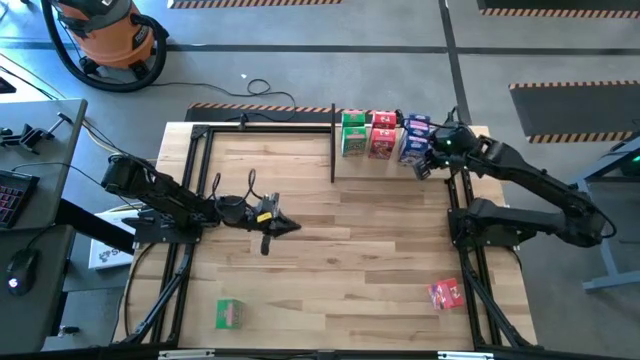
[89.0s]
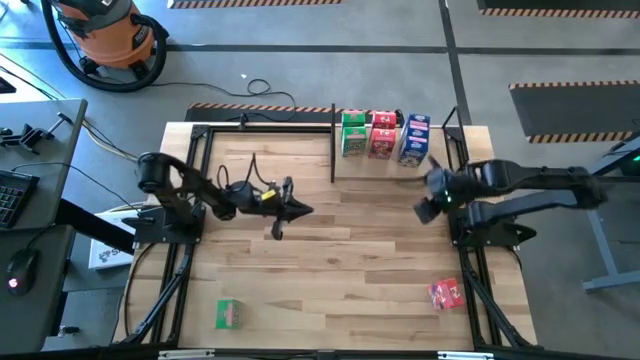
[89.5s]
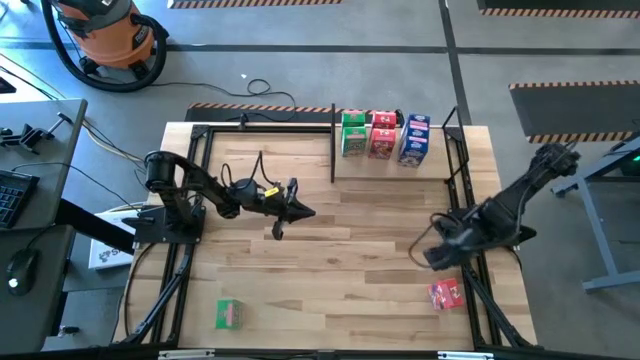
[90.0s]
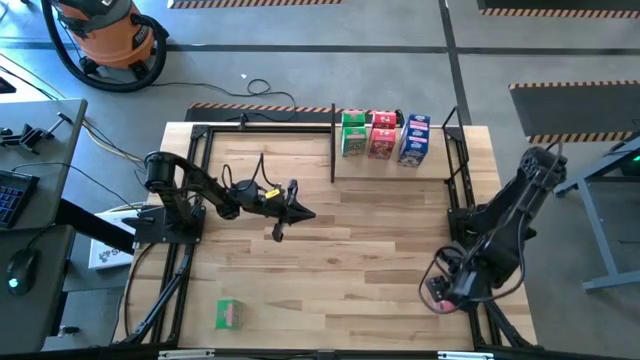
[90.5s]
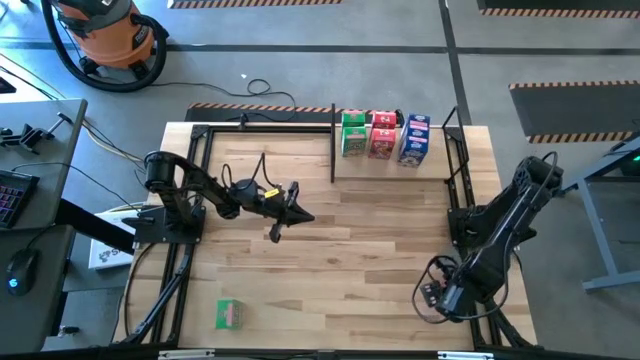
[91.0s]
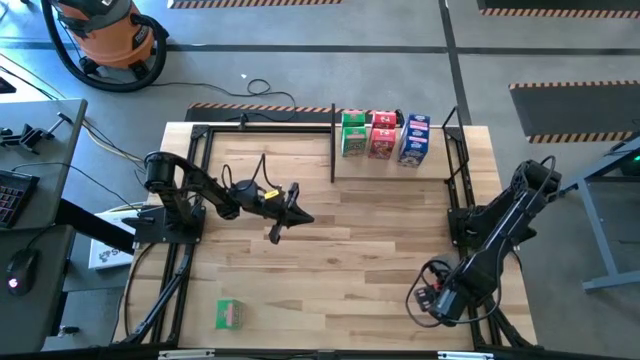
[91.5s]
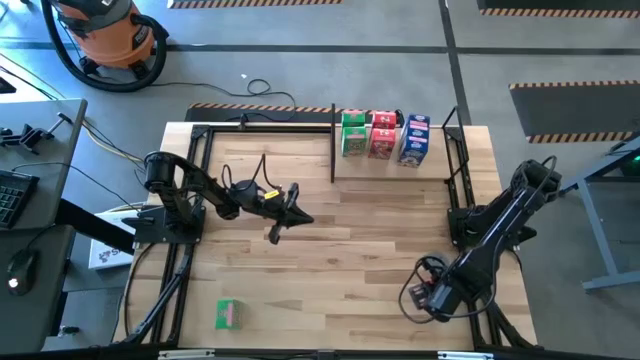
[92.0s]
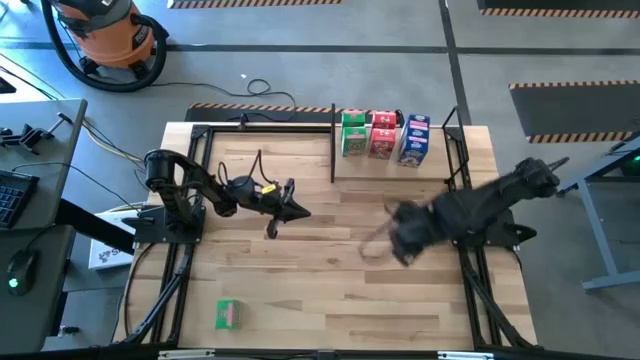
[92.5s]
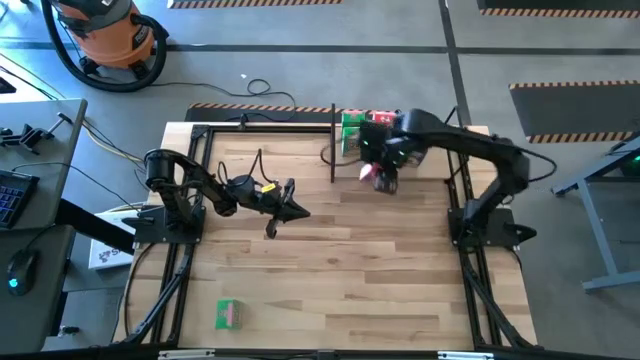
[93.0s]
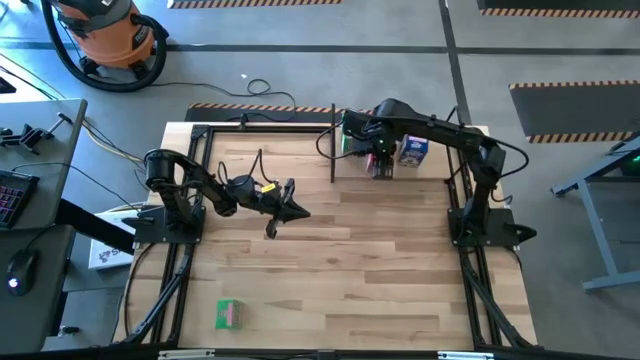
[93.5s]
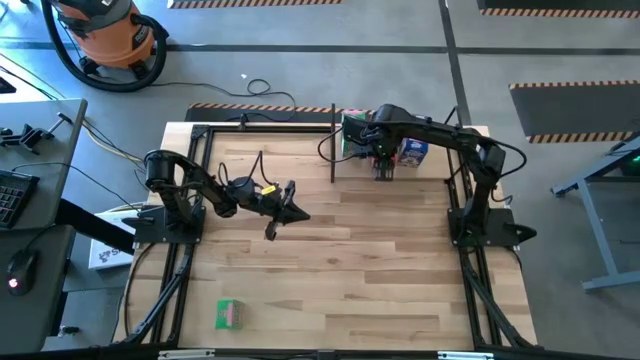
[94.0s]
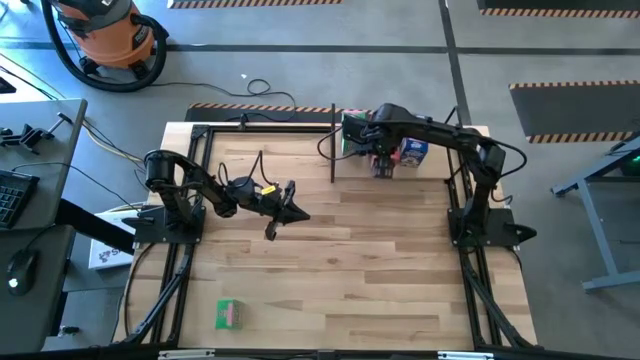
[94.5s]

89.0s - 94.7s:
Task: Stack cereal on shelf
Put the red cereal box on the shelf

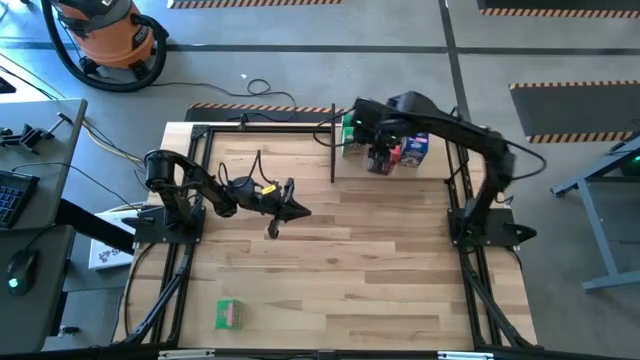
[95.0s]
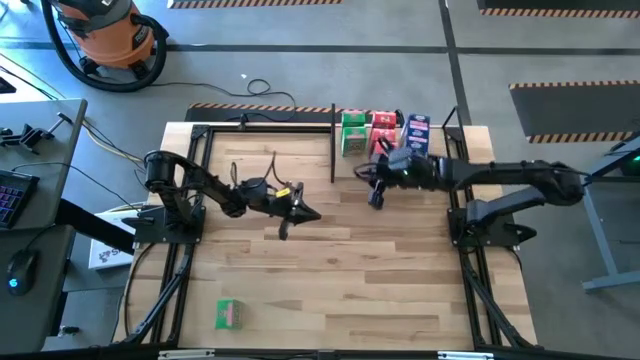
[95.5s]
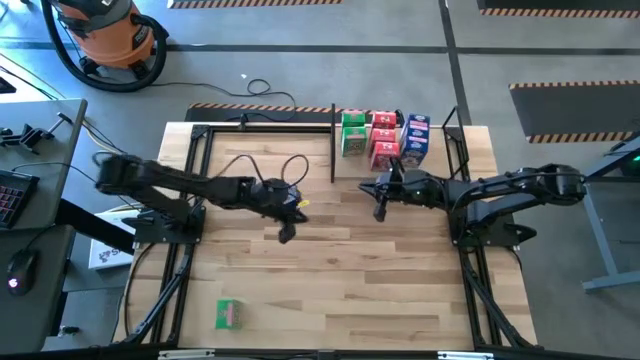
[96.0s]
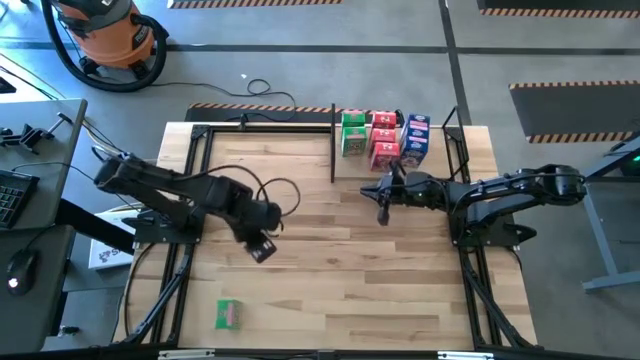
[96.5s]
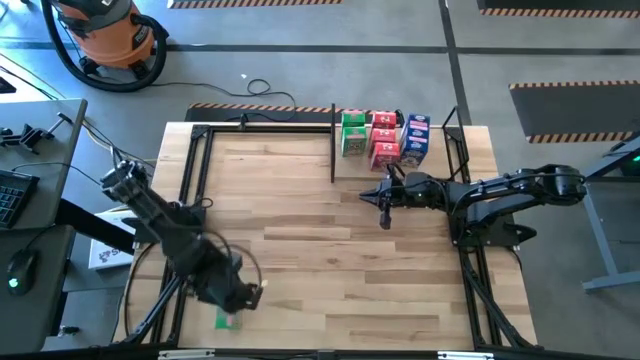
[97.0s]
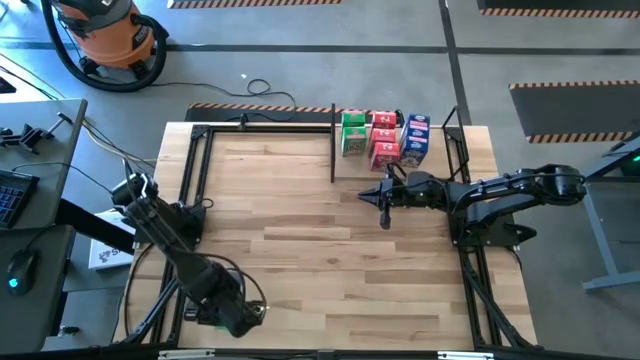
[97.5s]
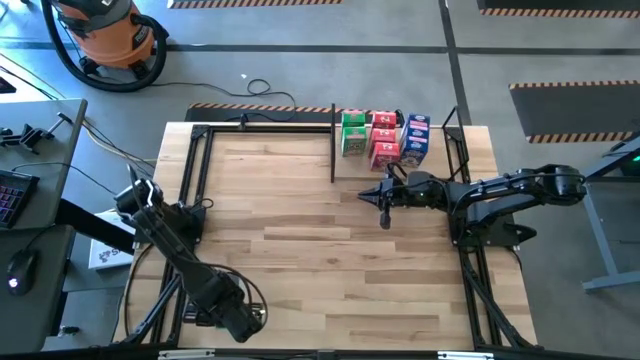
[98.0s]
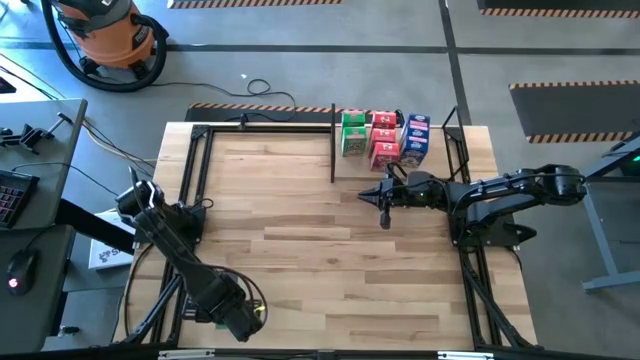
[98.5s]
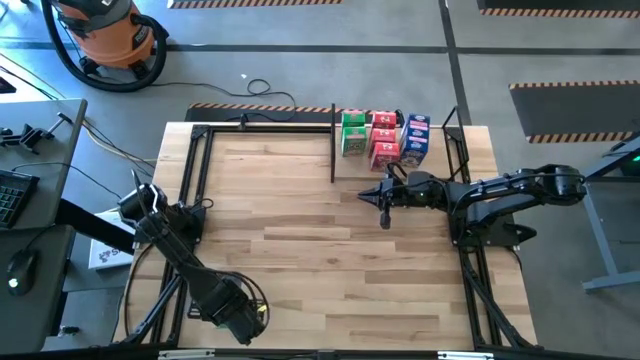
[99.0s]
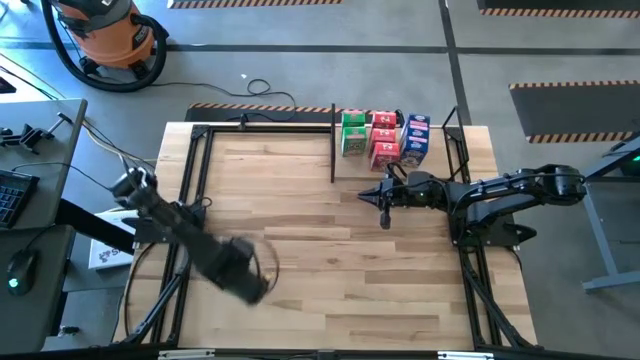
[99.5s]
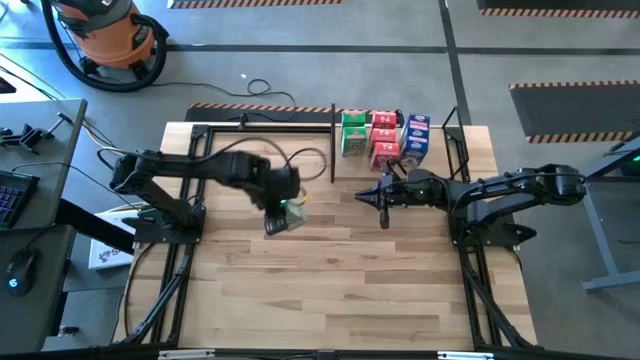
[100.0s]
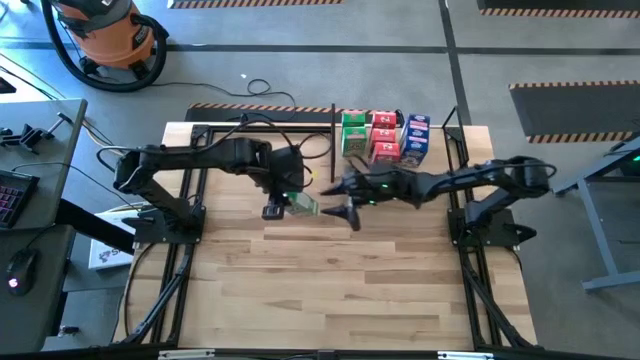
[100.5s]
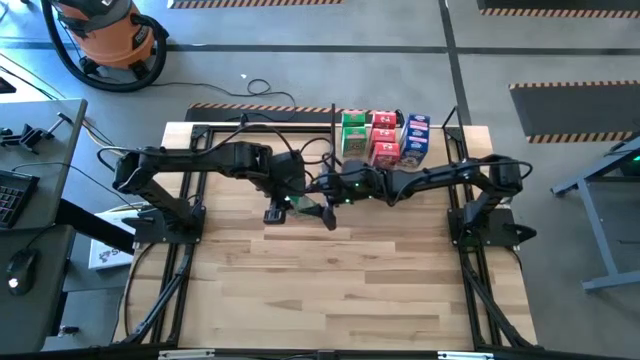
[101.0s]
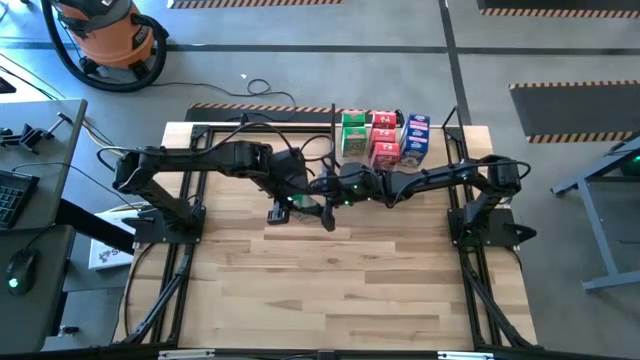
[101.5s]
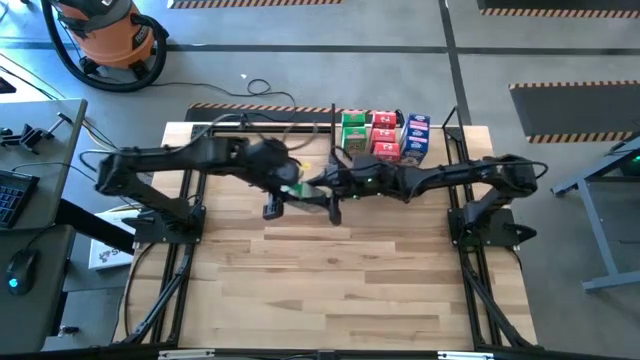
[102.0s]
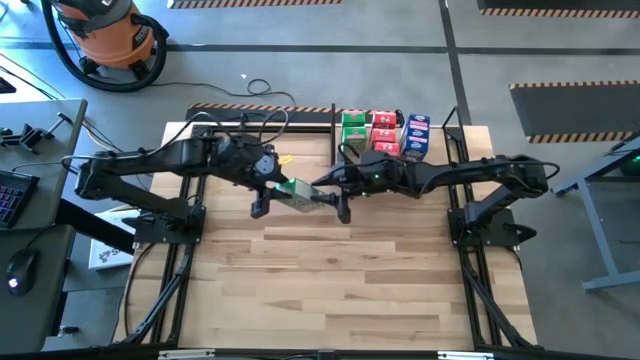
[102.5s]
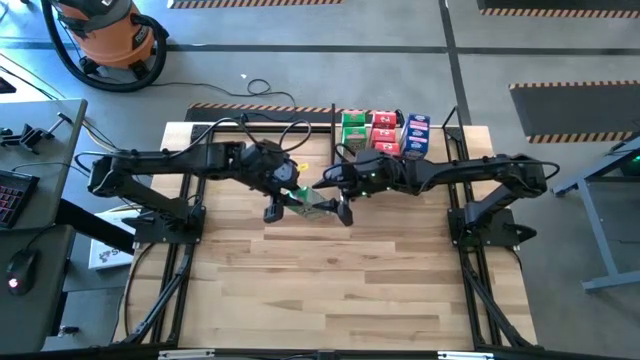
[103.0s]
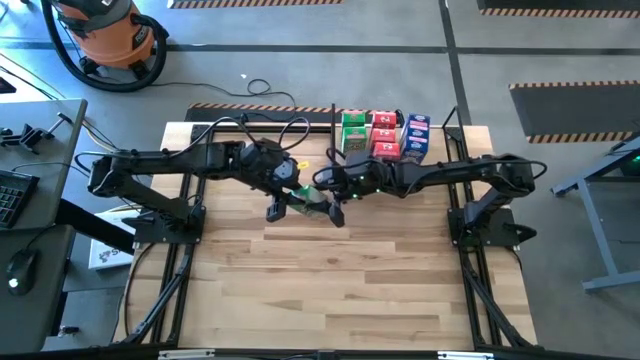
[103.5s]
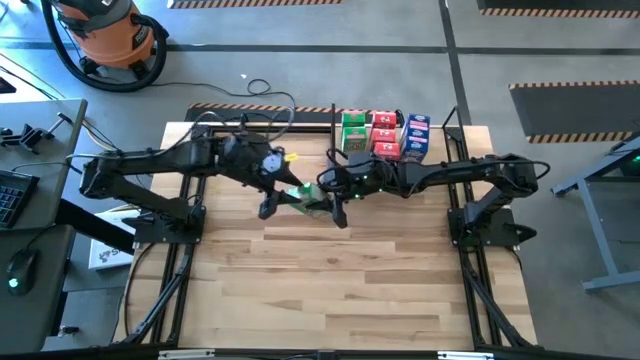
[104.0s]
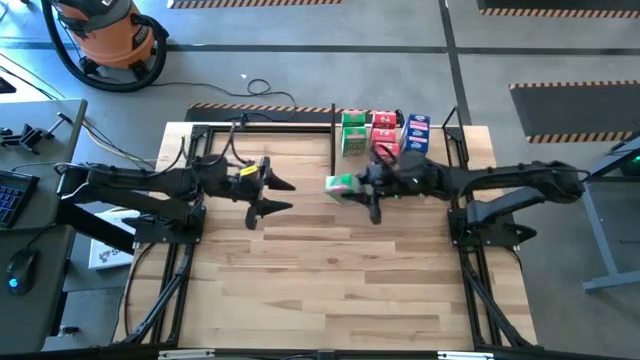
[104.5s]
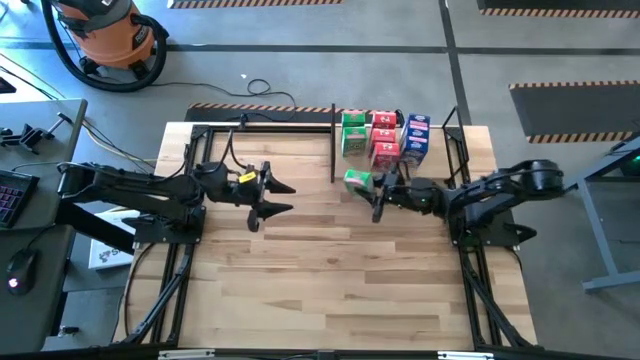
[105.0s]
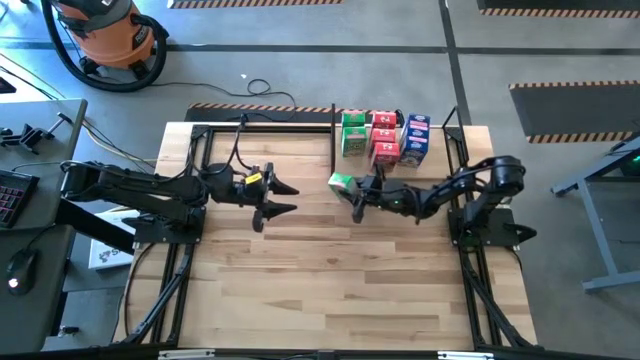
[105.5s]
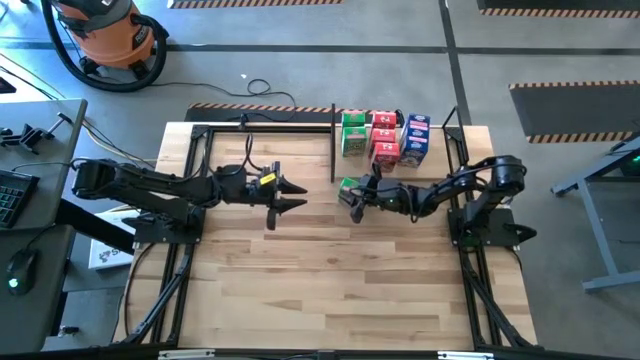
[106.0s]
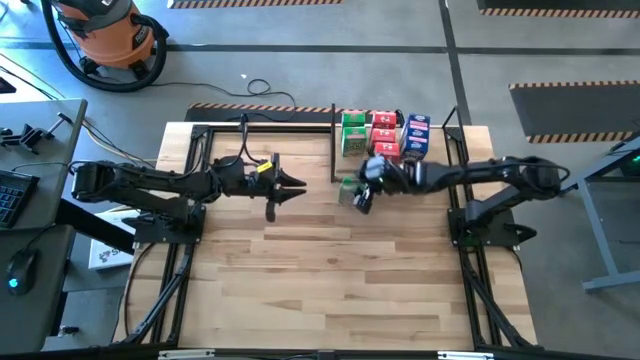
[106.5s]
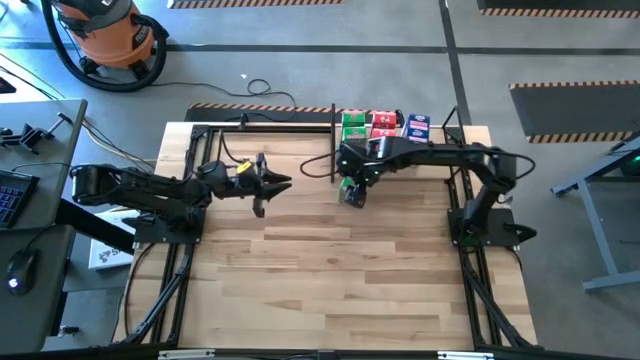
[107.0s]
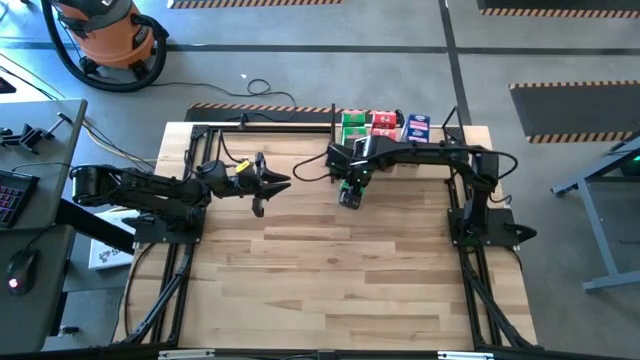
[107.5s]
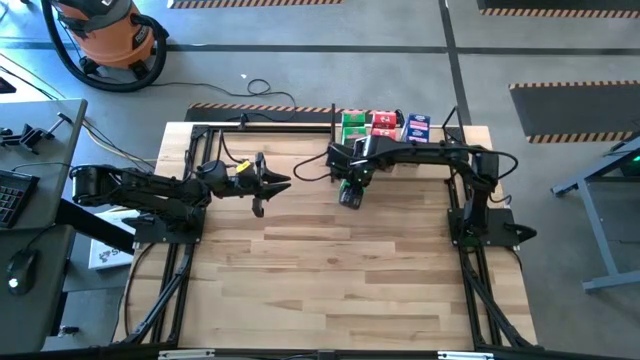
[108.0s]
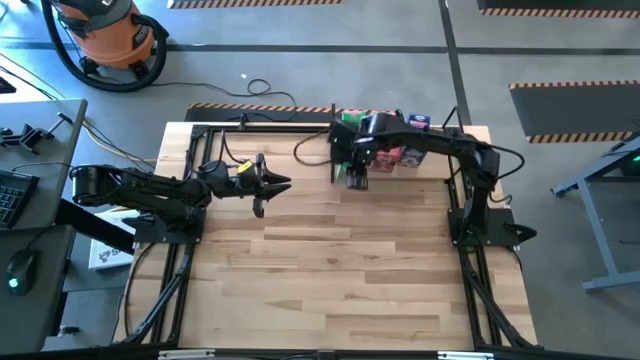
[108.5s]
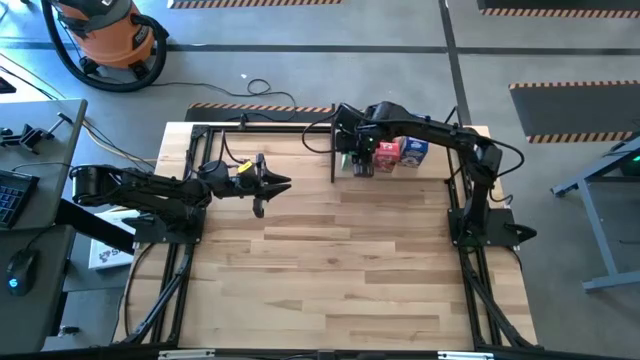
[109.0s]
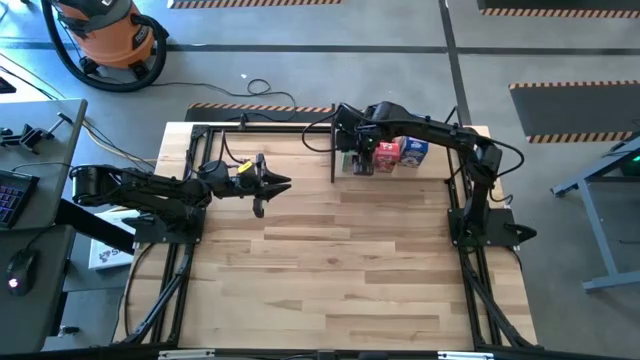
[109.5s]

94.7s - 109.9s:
Put the green cereal box on the shelf

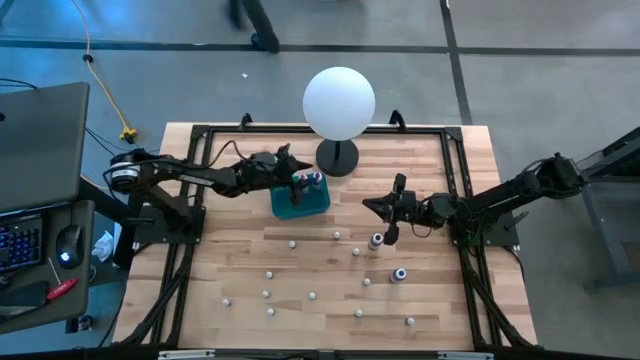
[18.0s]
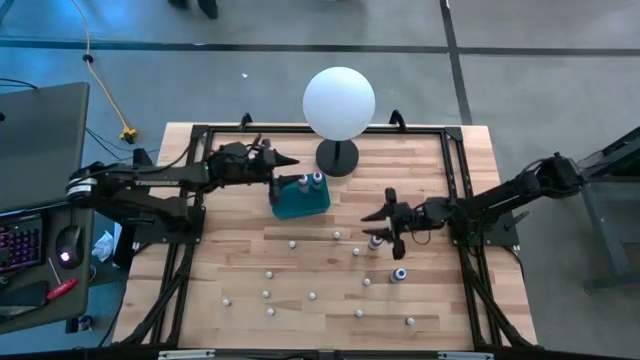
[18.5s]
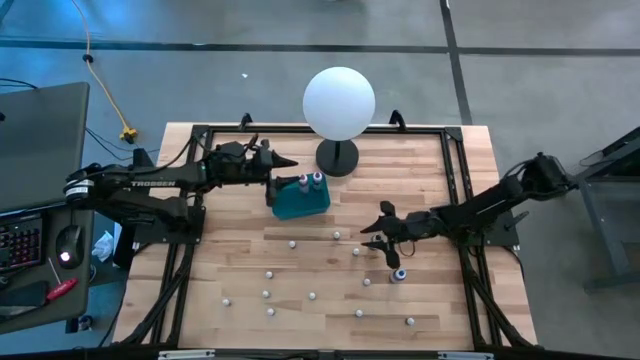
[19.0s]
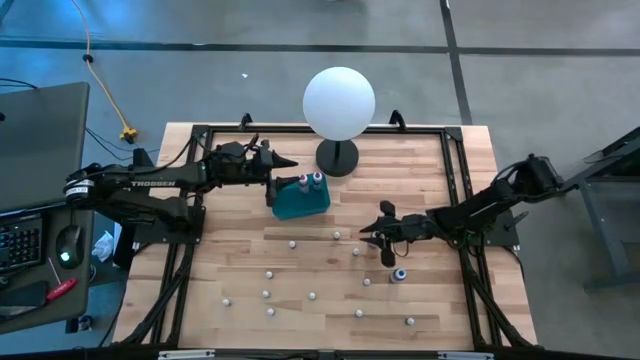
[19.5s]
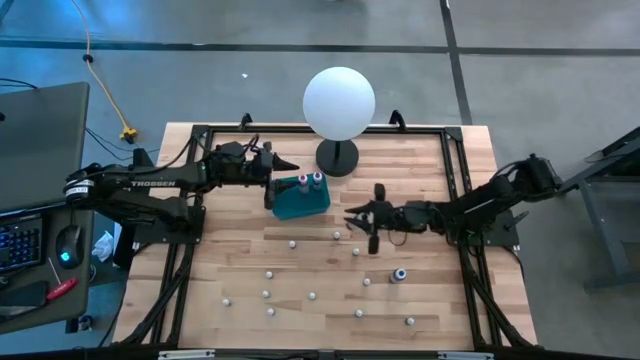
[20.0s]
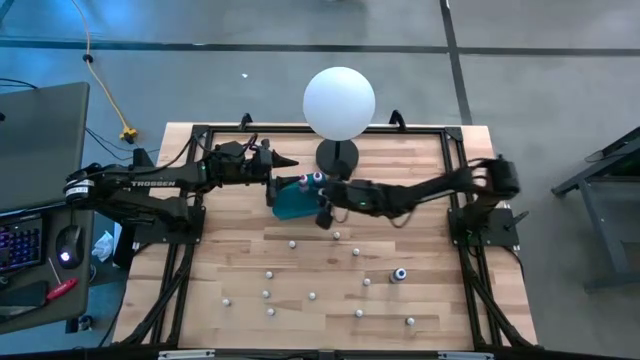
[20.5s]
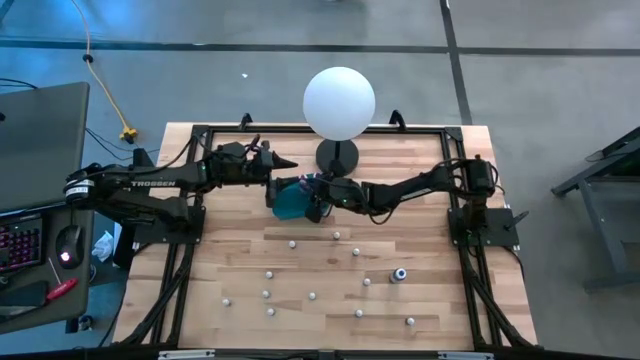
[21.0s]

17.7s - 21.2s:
Task: Pick & Place food coloring
Put the large black food coloring bottle into the blue bin
